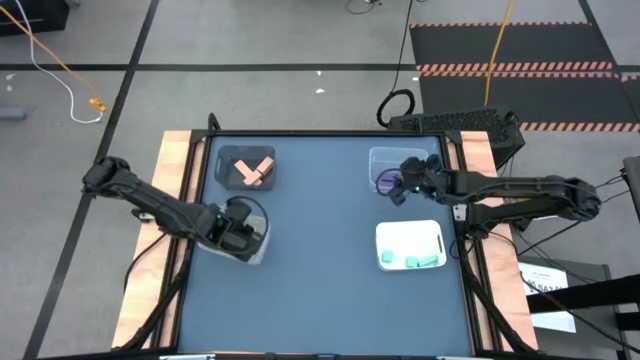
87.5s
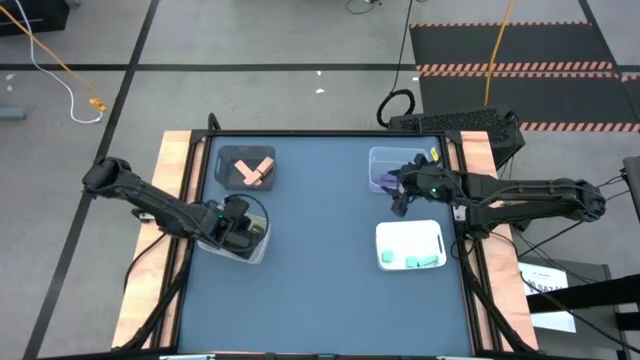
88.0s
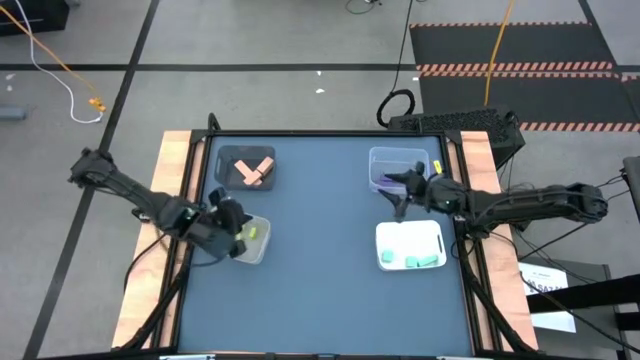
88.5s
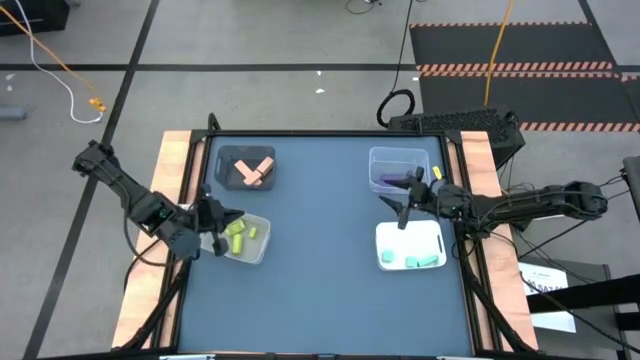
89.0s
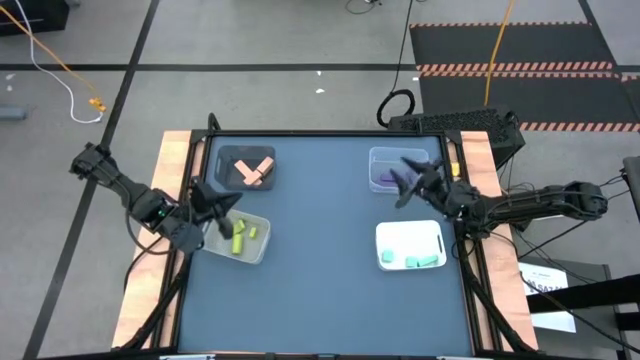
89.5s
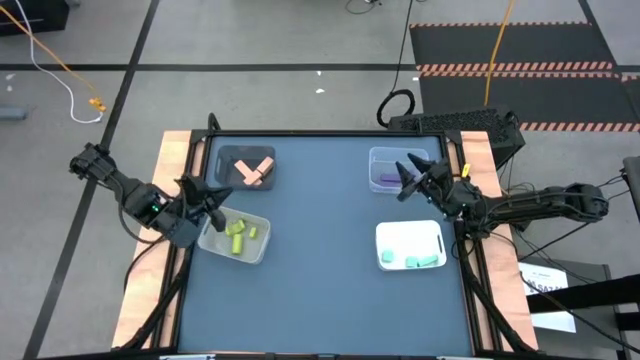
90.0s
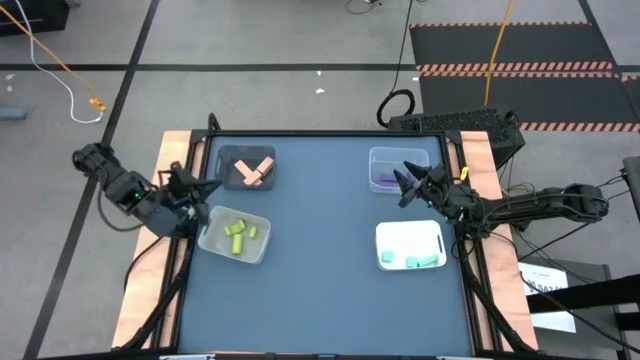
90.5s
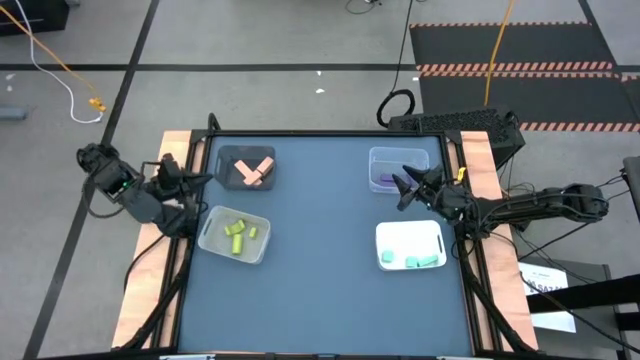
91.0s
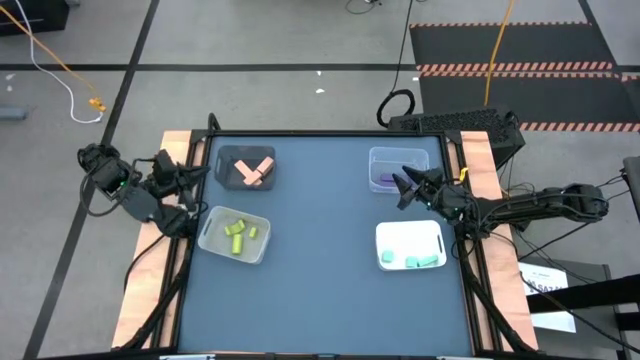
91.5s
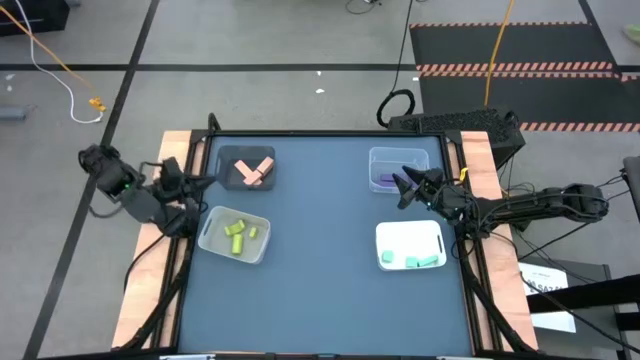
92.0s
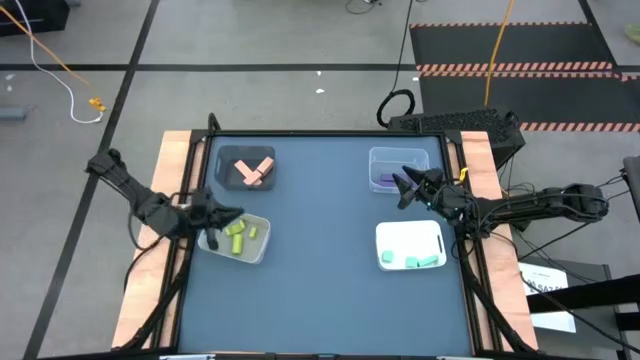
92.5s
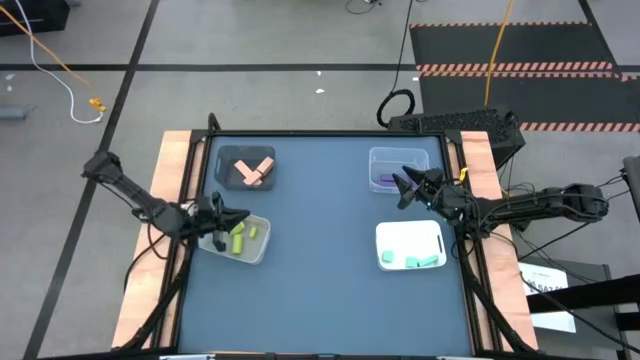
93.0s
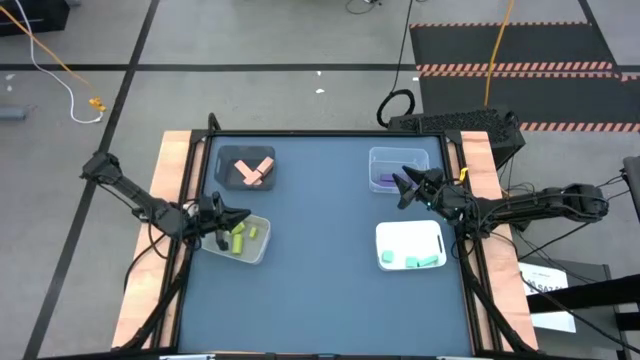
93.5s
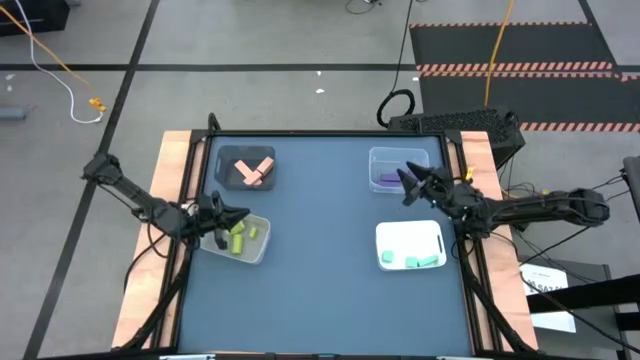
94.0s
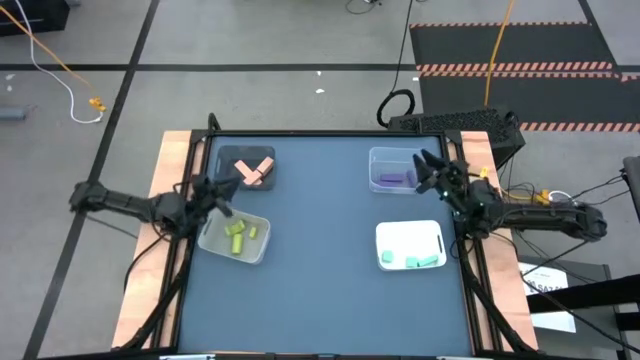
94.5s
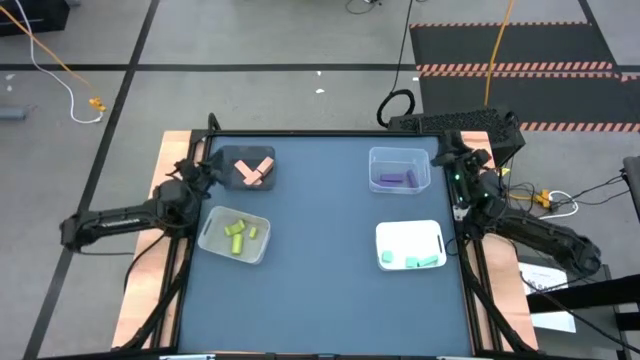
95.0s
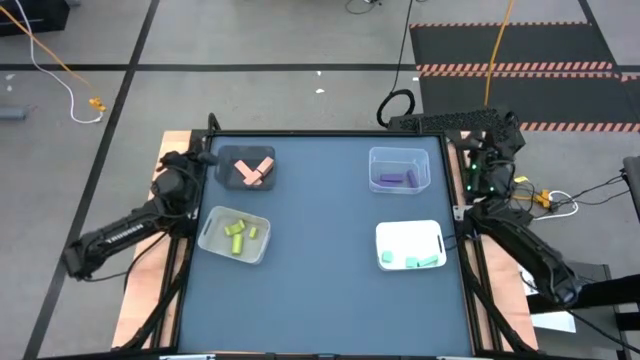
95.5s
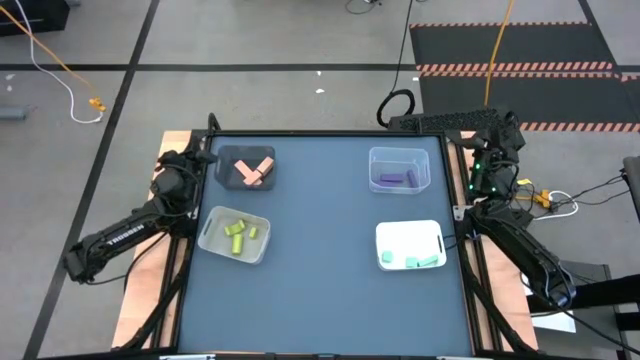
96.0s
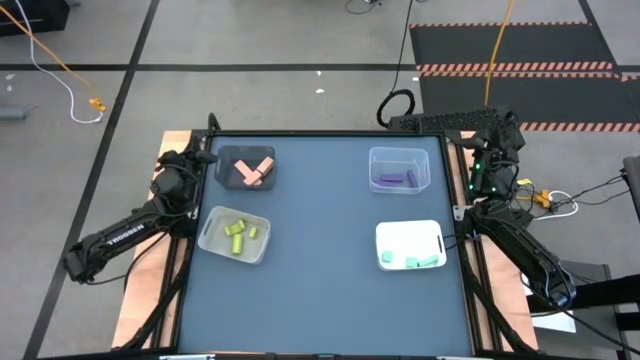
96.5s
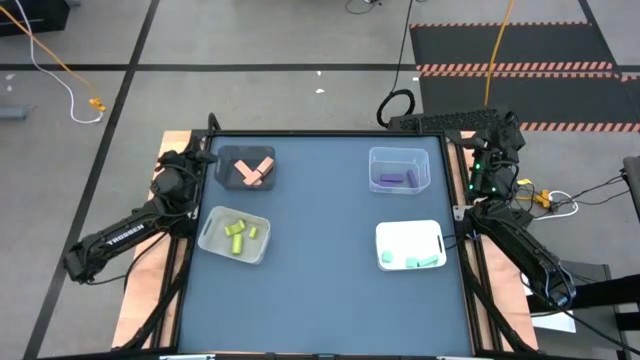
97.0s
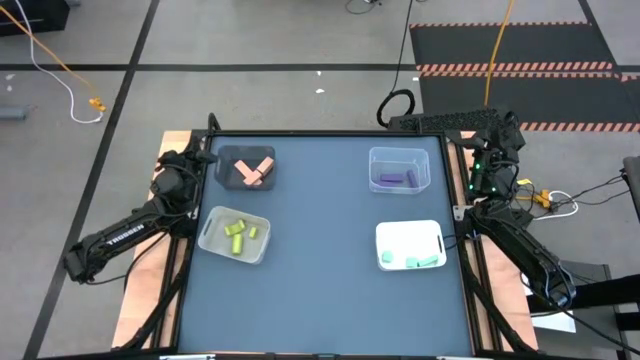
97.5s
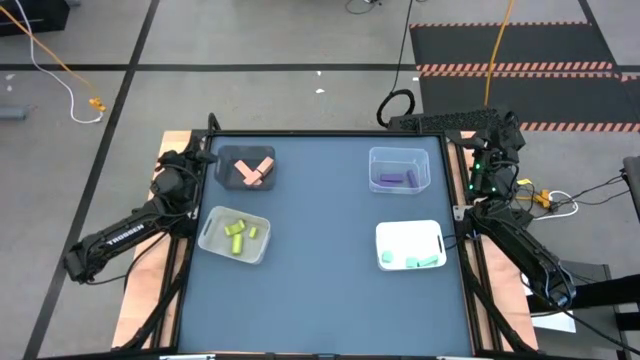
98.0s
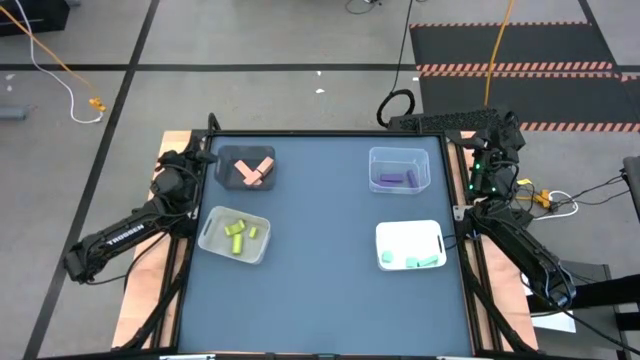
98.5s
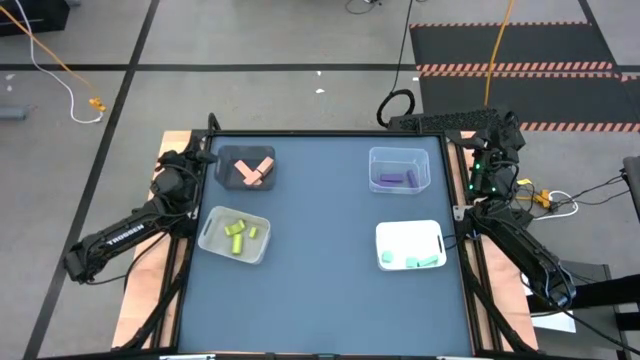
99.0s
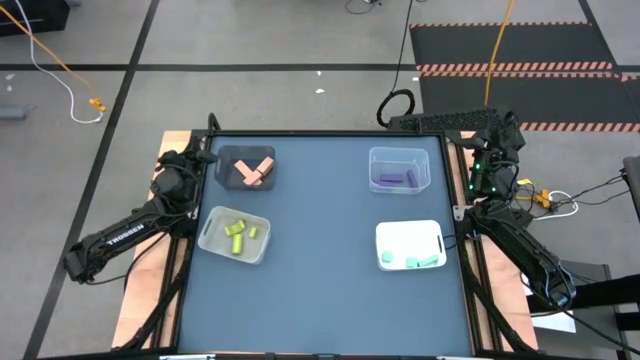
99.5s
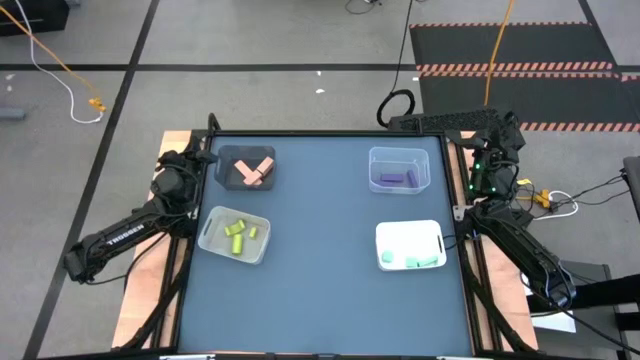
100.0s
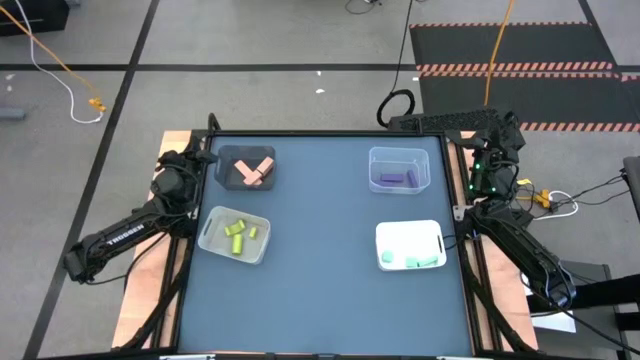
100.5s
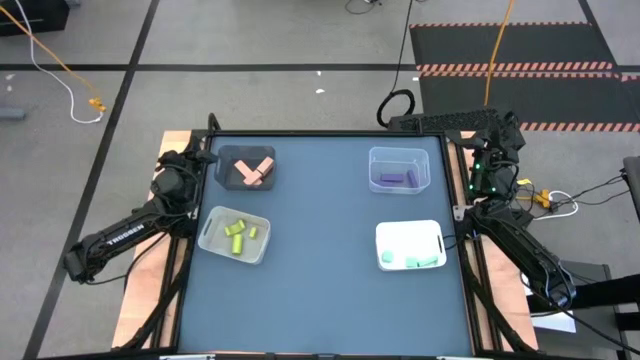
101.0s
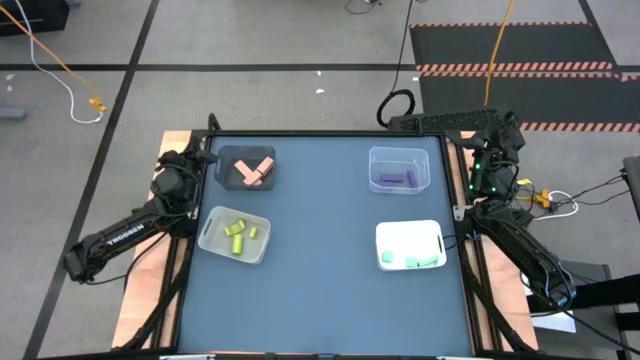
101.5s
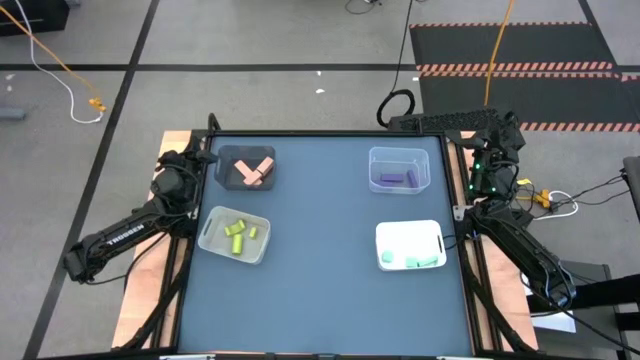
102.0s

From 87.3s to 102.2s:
Task: Sort & place blocks by color
Return to Home Position

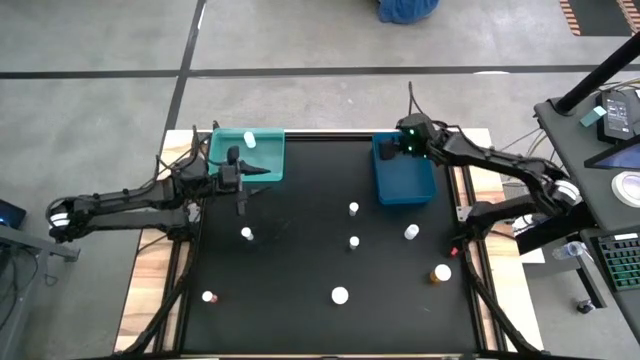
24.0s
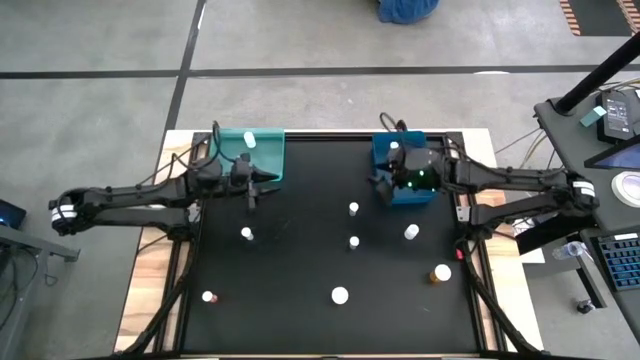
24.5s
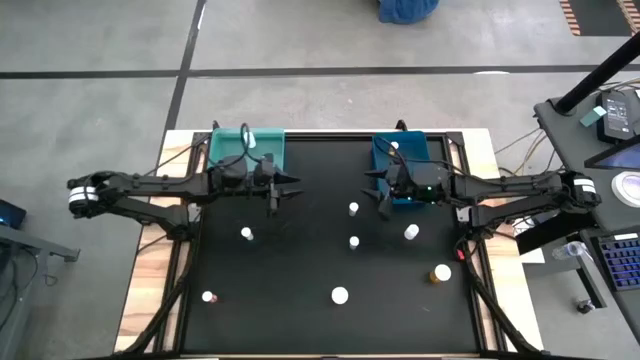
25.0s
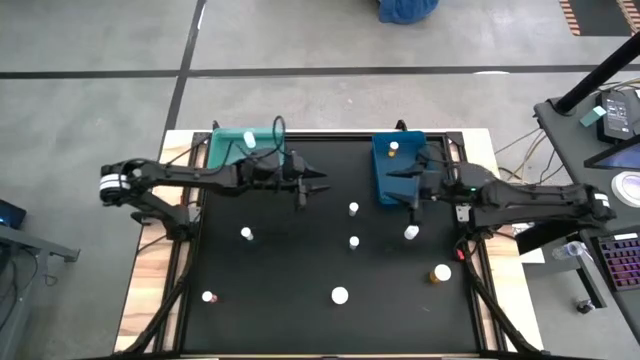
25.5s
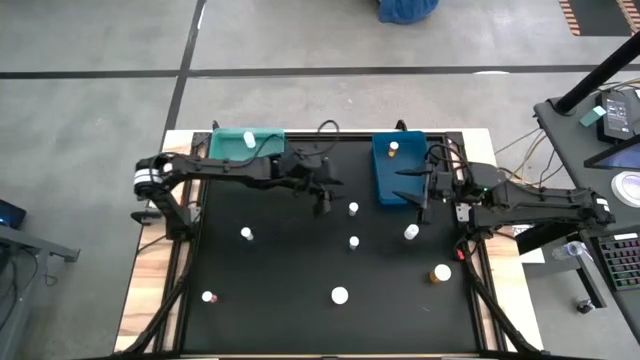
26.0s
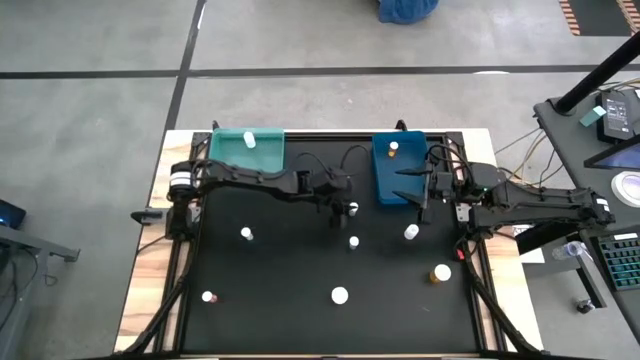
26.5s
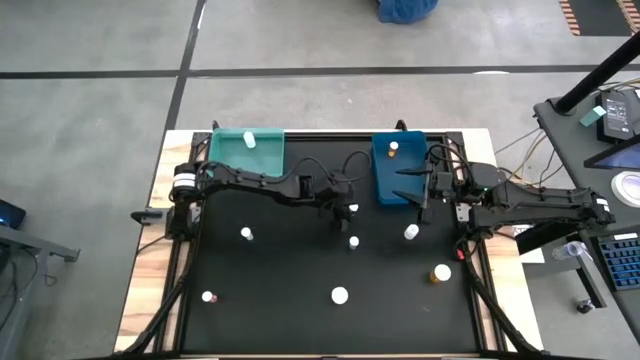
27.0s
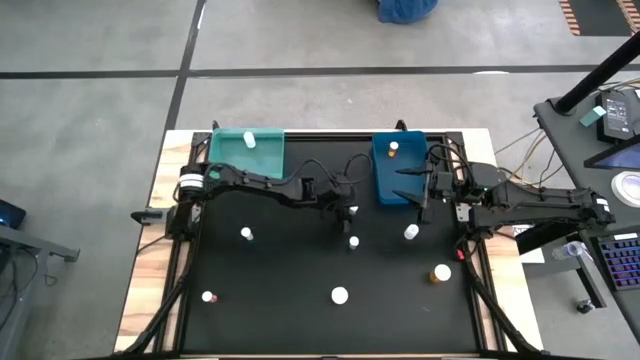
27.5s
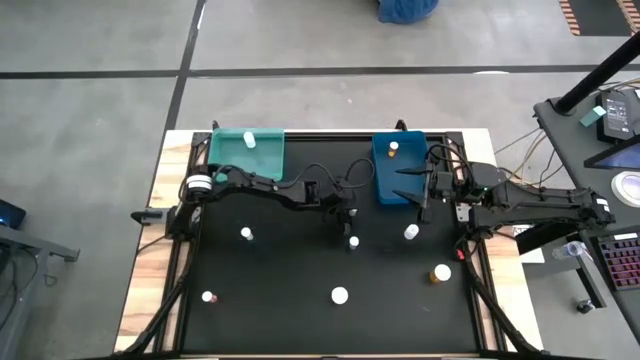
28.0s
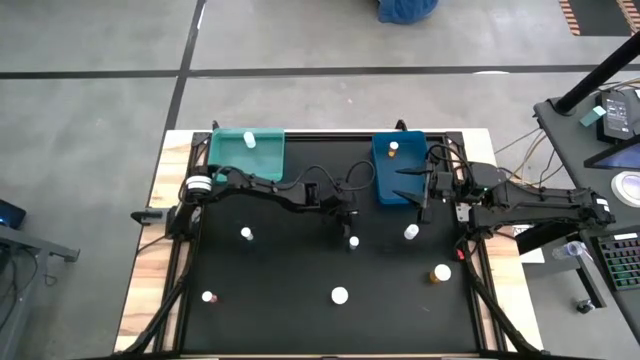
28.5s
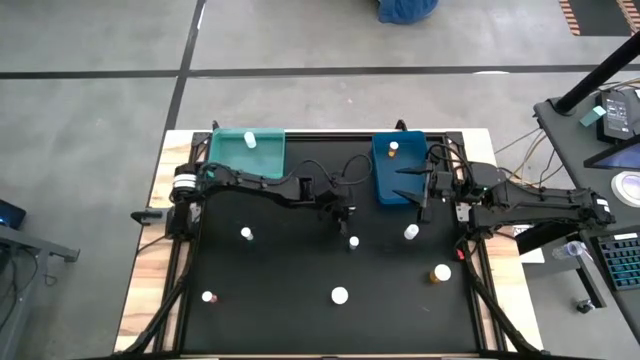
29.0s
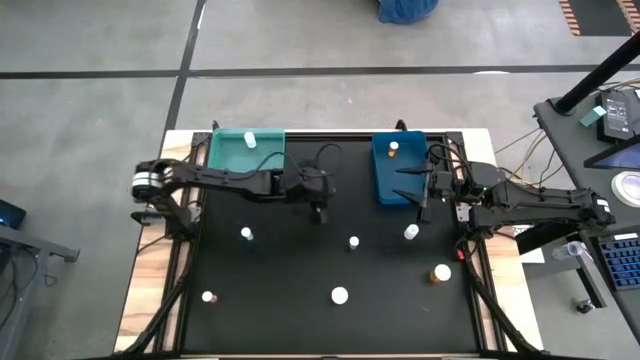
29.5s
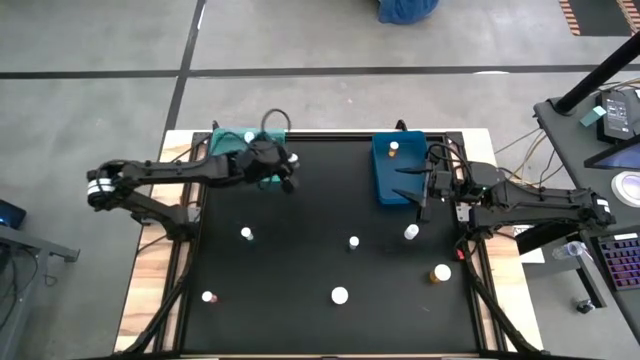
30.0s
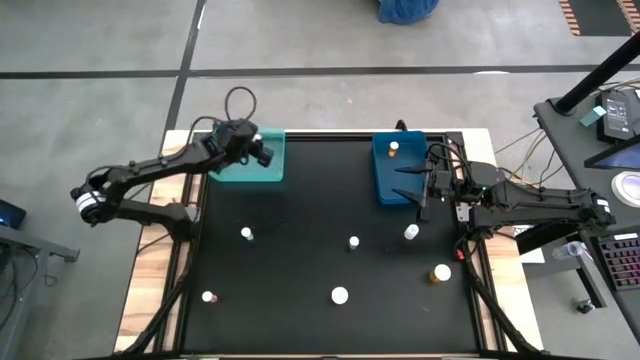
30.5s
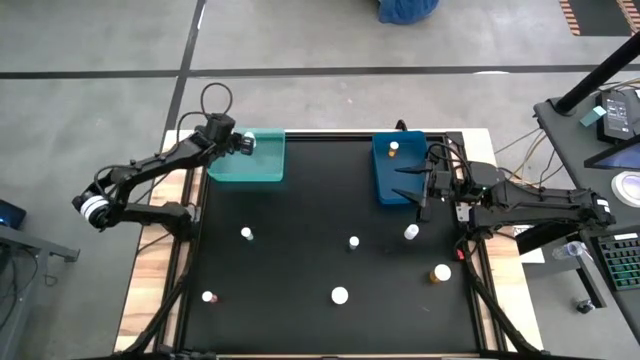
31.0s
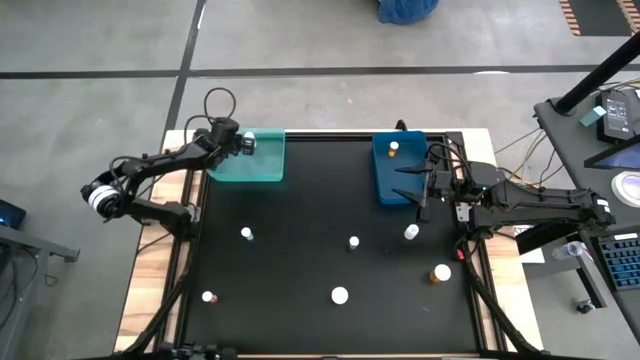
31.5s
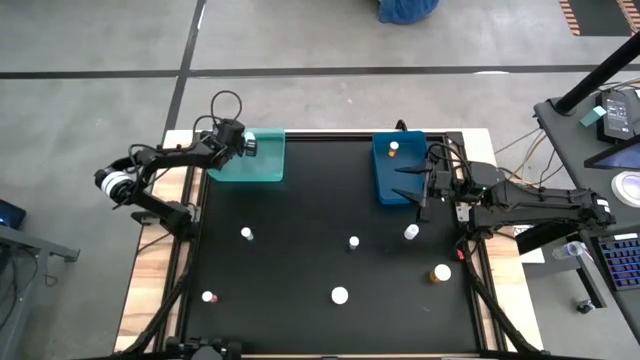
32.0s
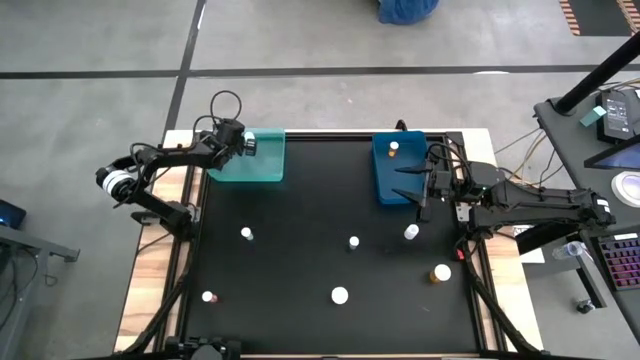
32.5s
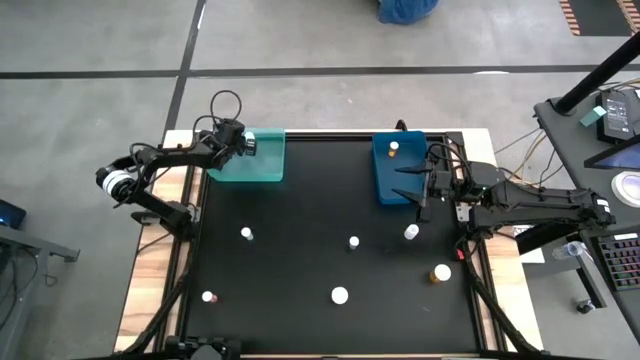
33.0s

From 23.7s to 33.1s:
Task: Pick and place medicine bottles into bin by pill shape (circle, oval)
Put the white capsule bottle into the light blue bin
